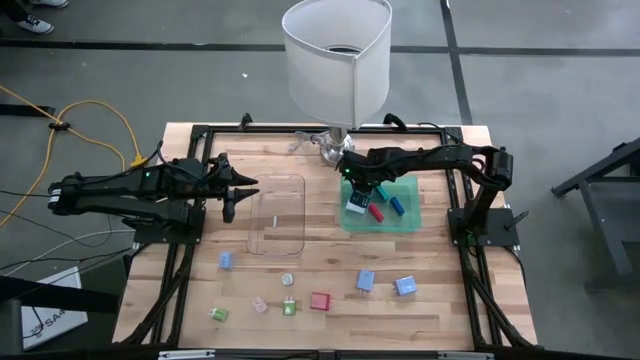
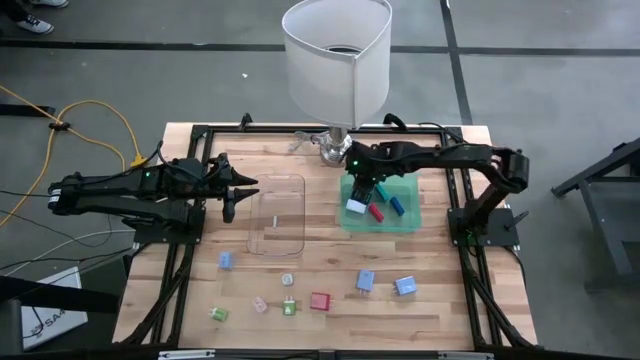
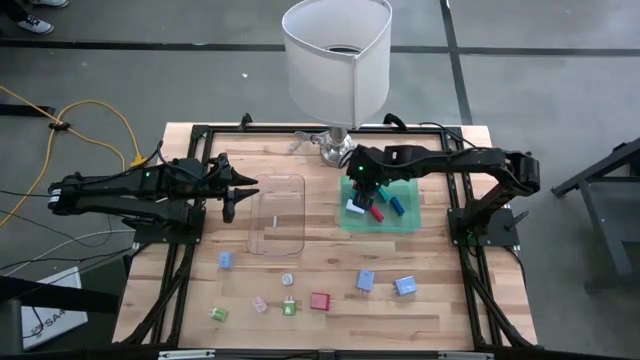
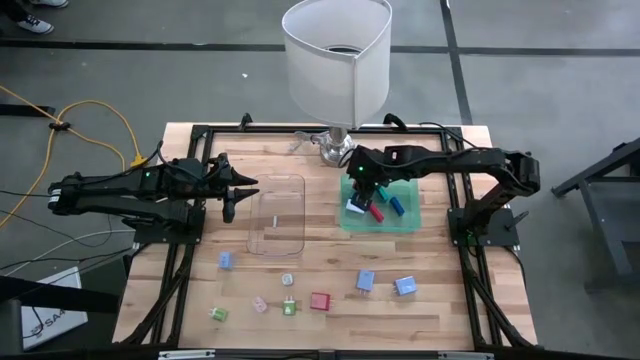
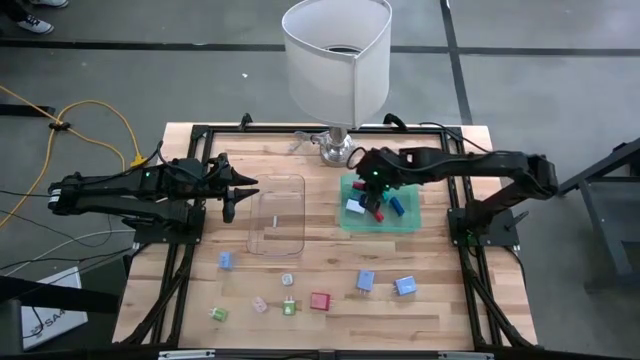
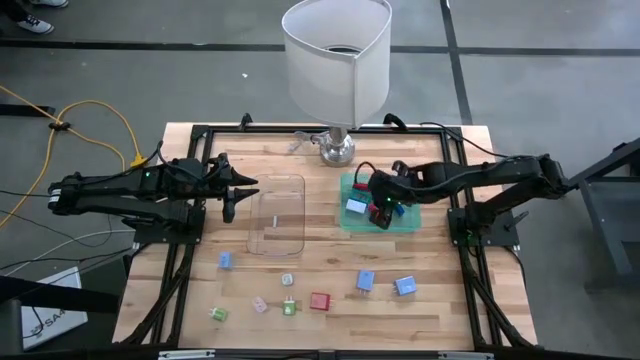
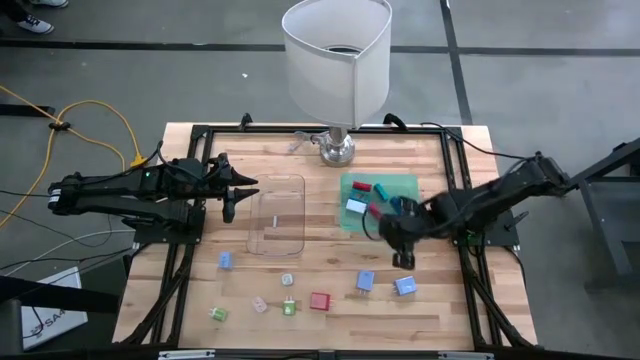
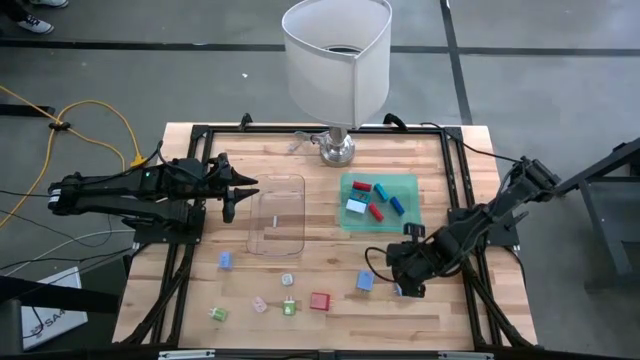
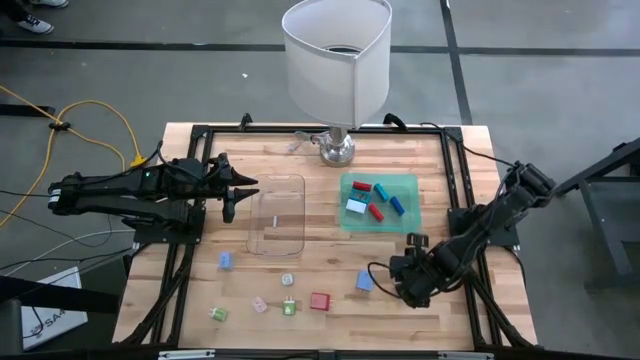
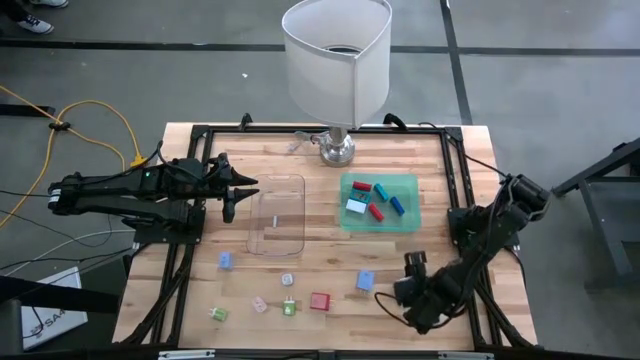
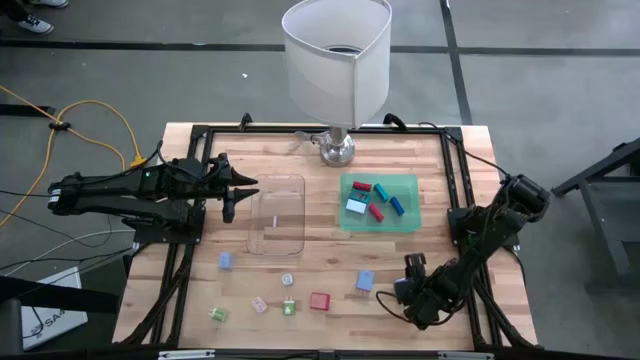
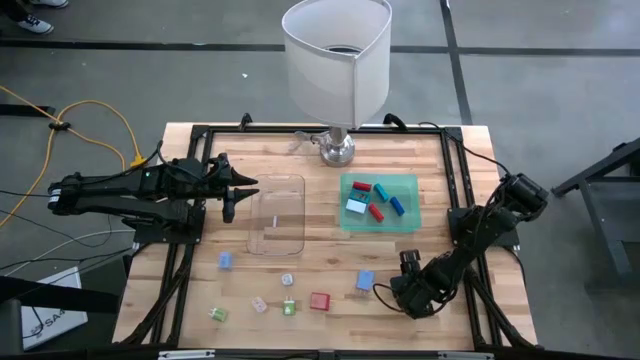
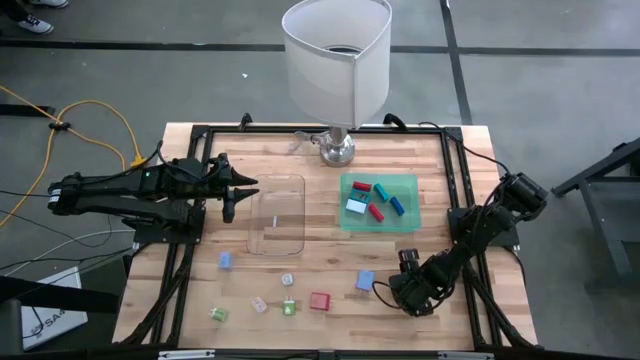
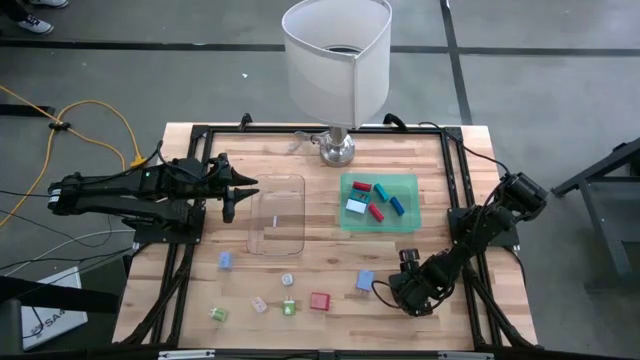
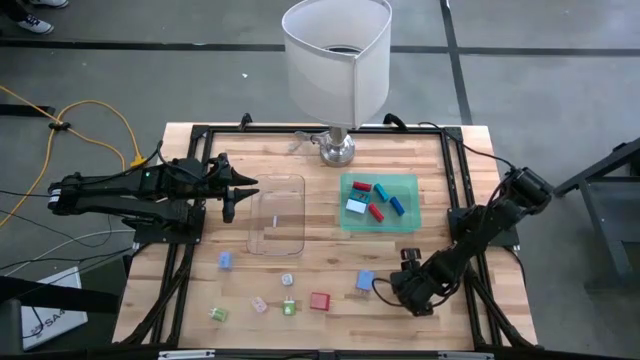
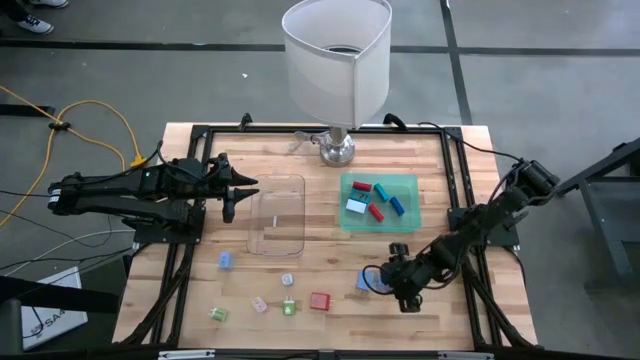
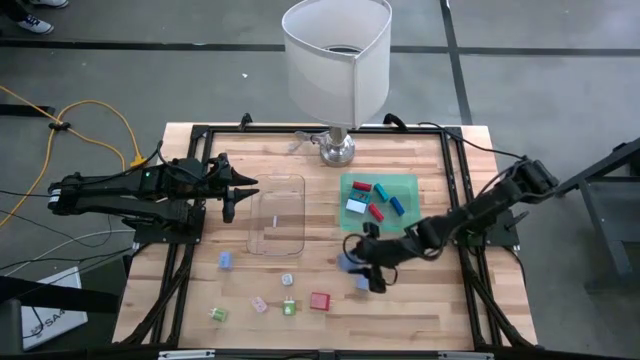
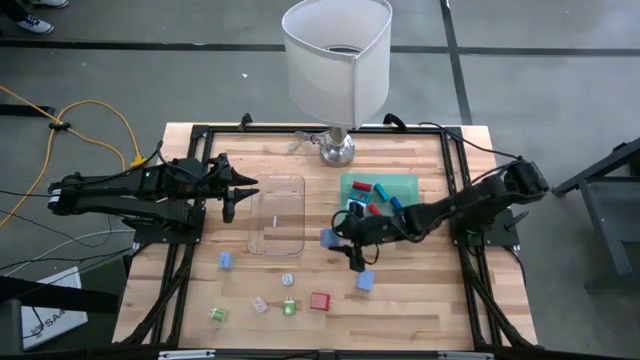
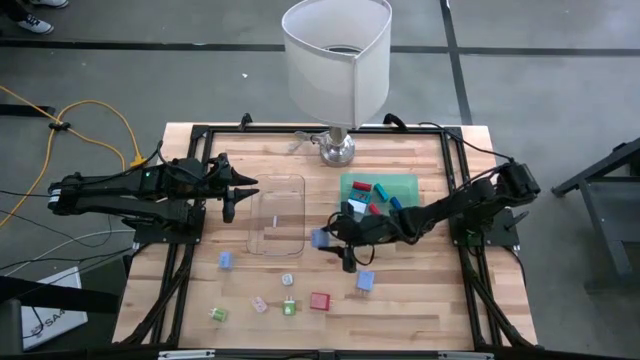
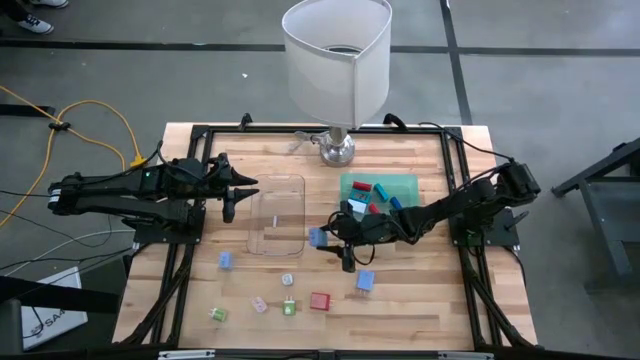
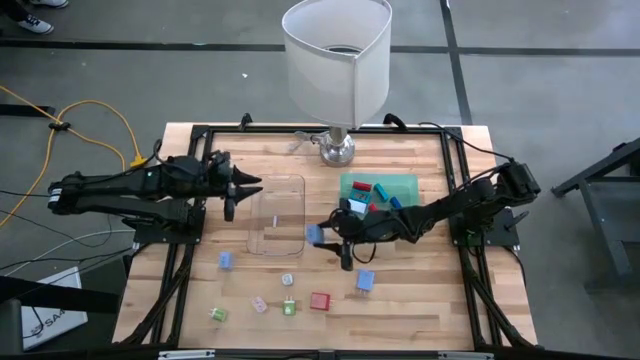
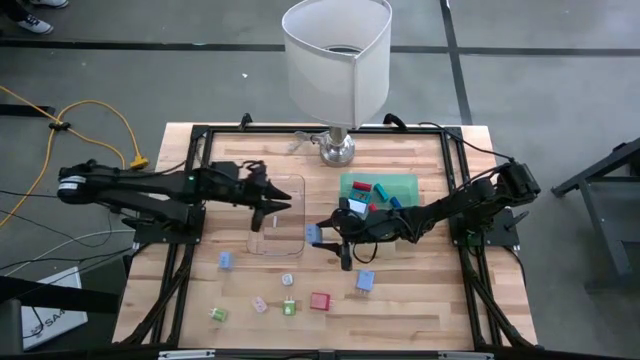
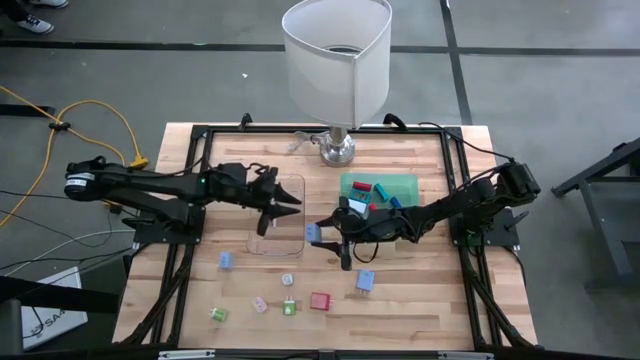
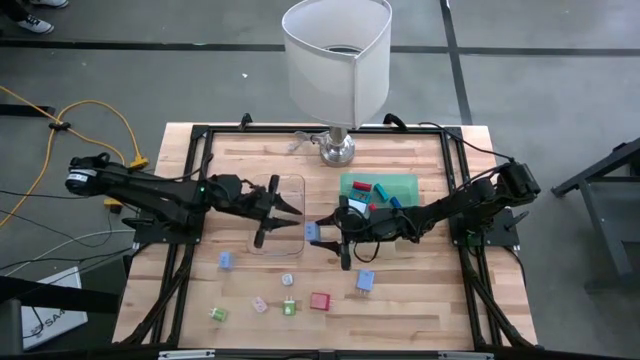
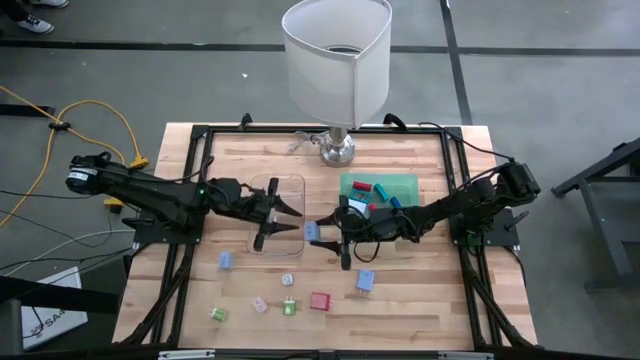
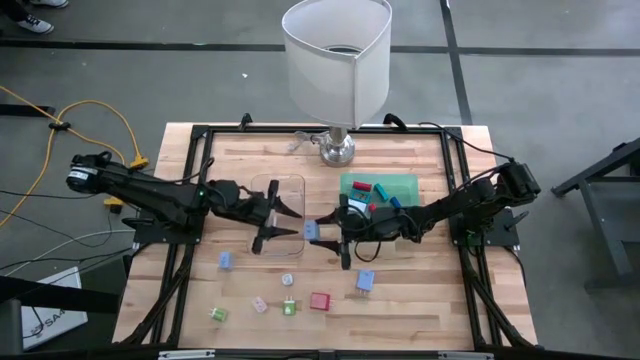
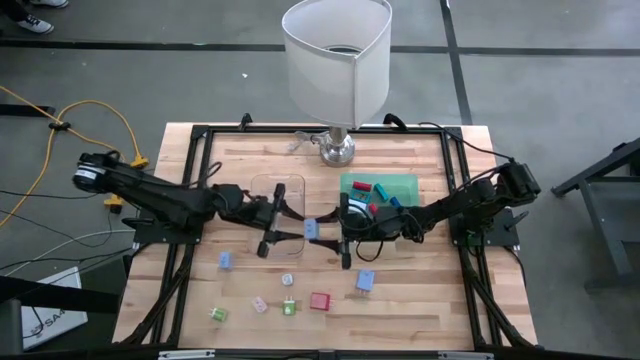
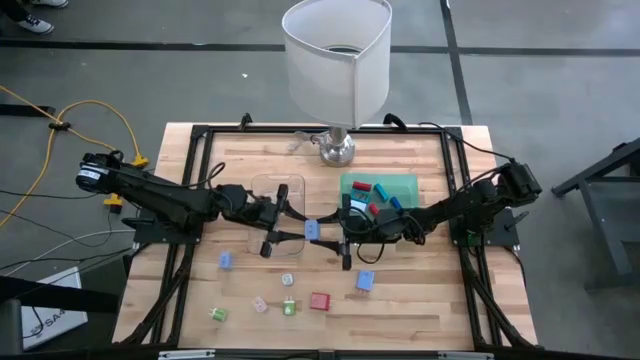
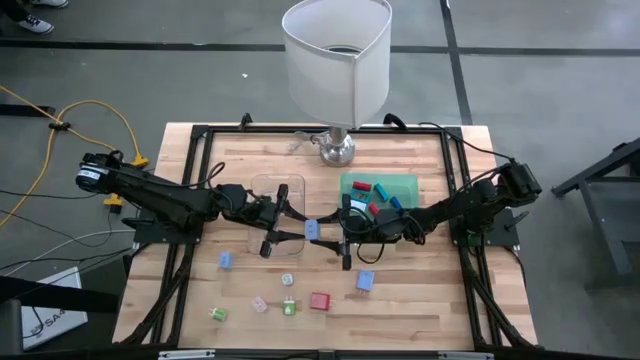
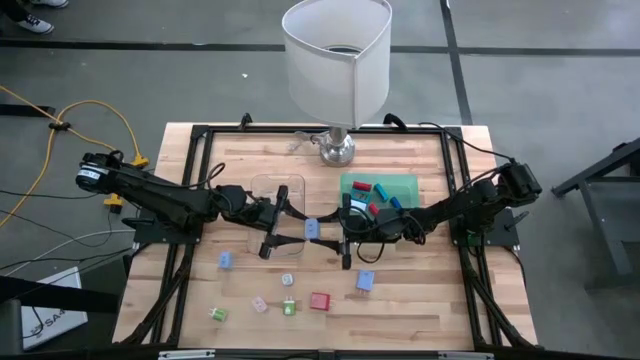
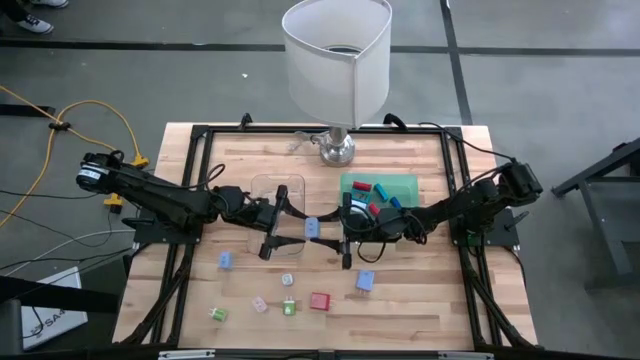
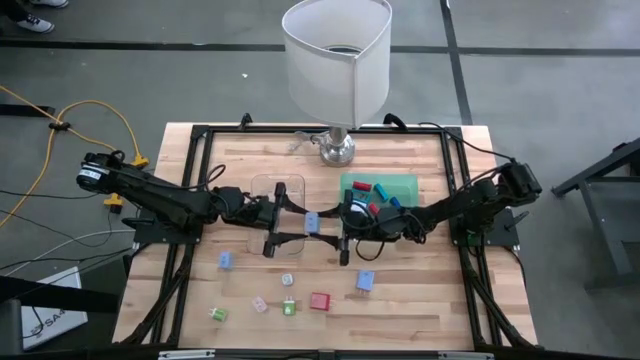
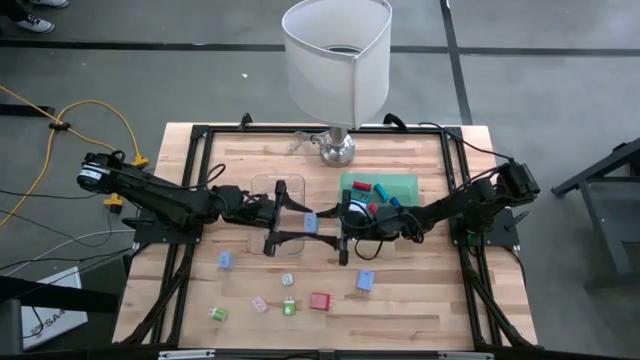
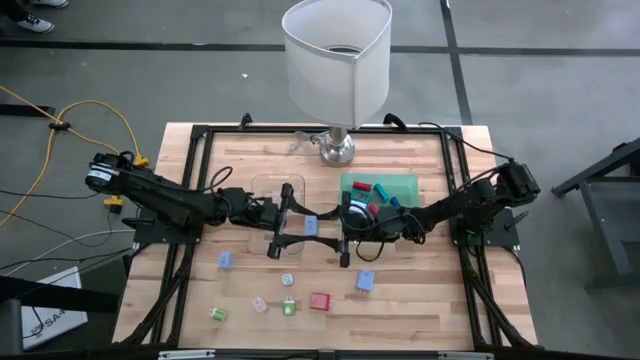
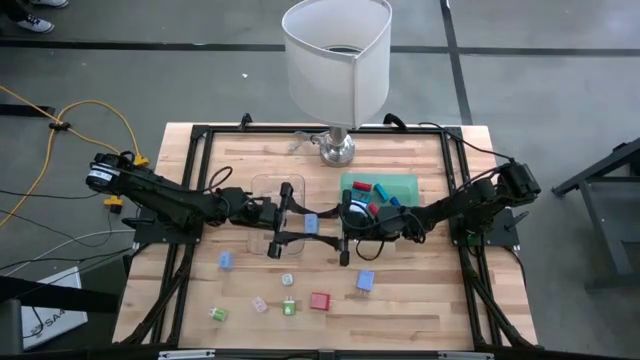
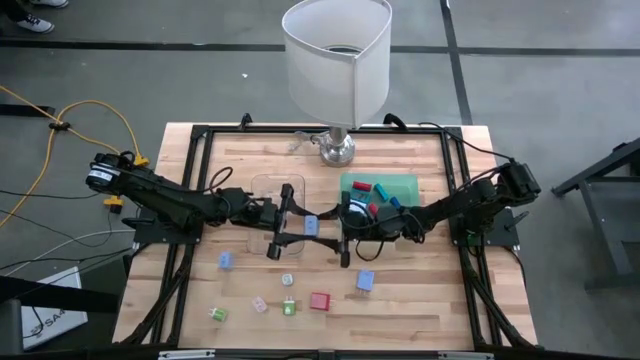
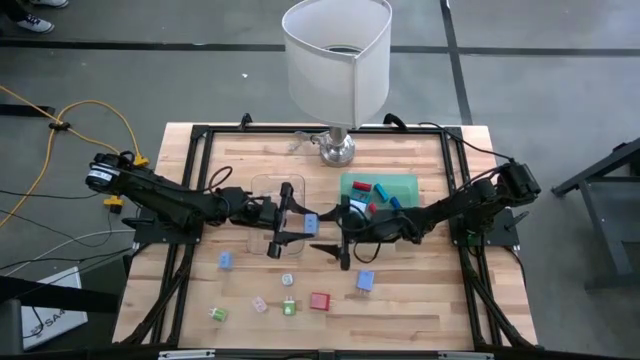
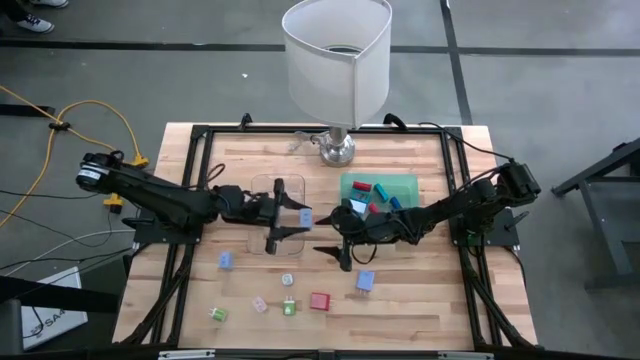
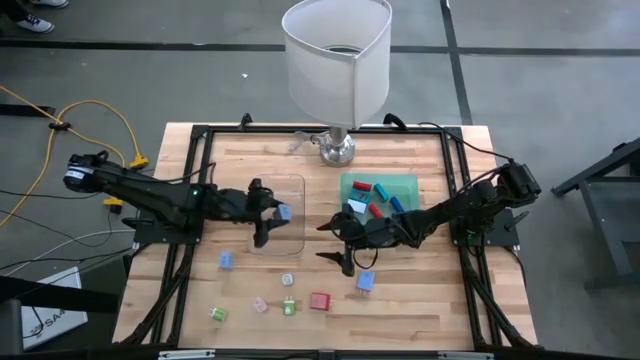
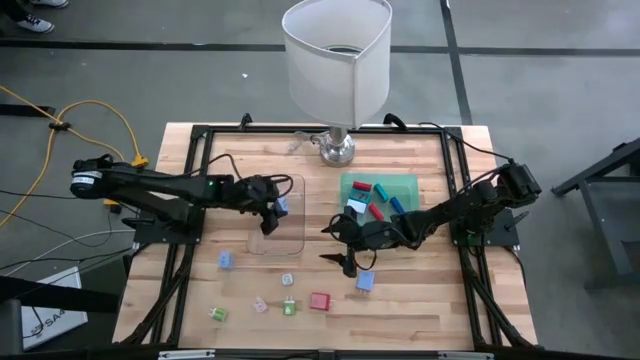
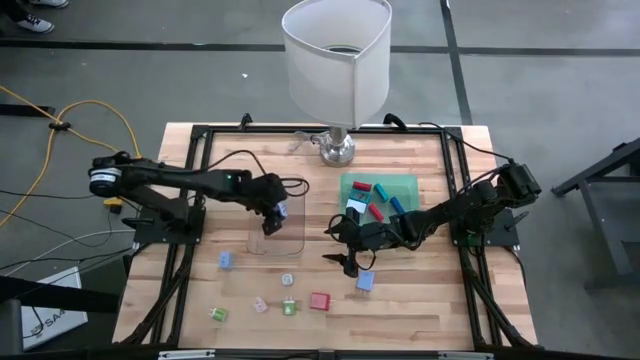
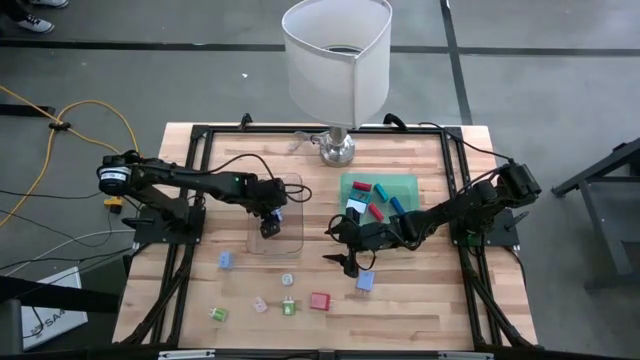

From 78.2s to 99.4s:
Task: Pick & Place Office items
Put the right blue charger adapter into the transparent bin

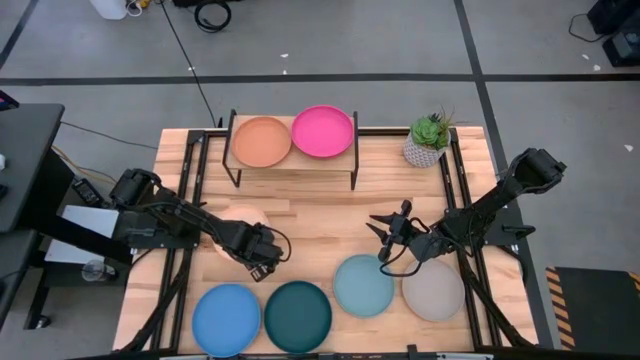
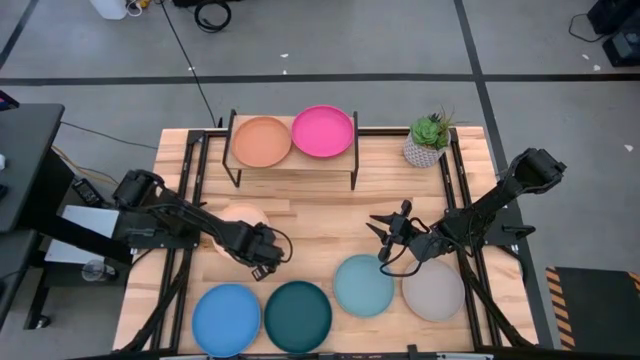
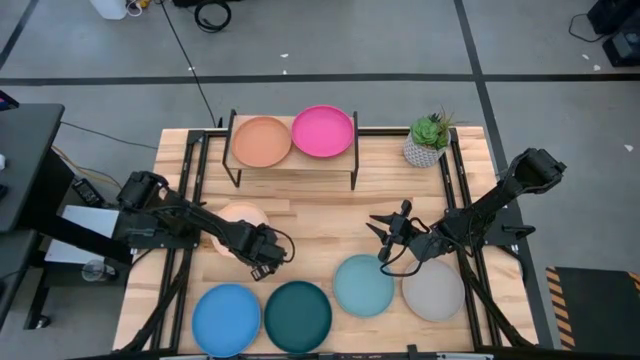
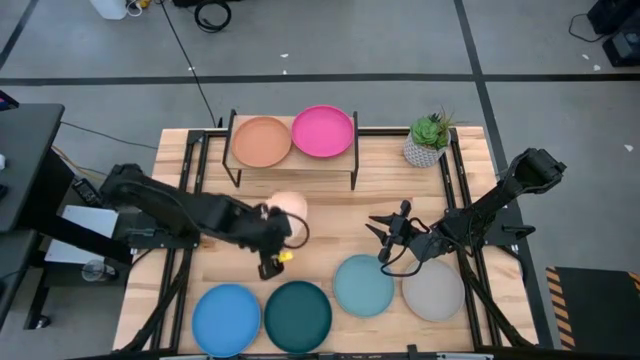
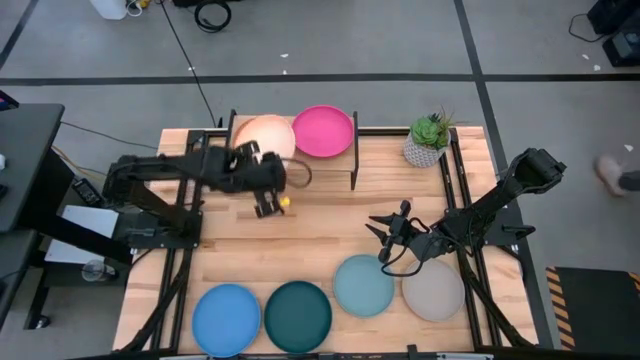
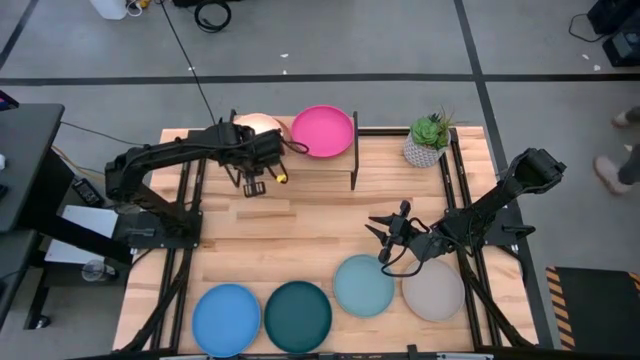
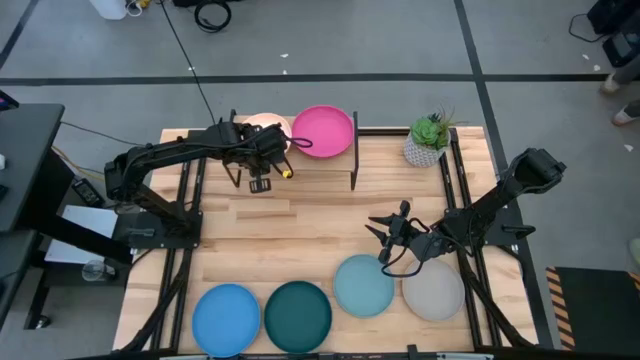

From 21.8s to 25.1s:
Task: Place and stack plates onto a shelf
Stack the light orange plate on top of the brown plate on the shelf
